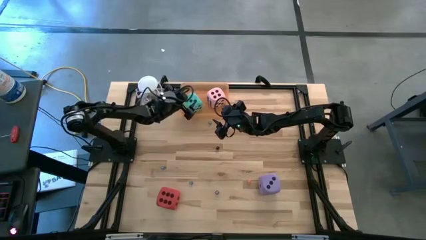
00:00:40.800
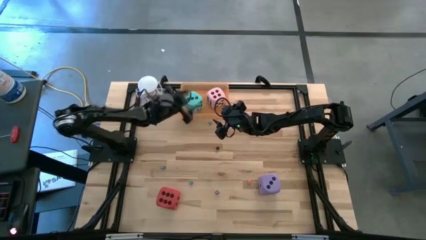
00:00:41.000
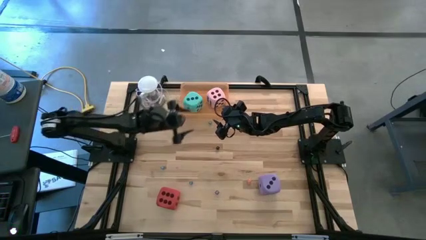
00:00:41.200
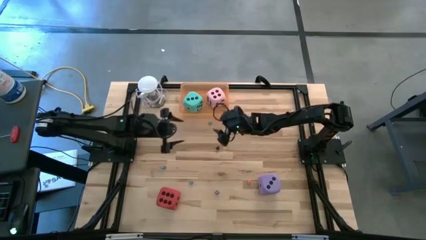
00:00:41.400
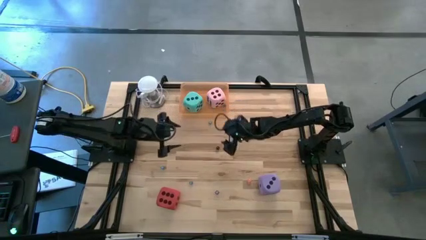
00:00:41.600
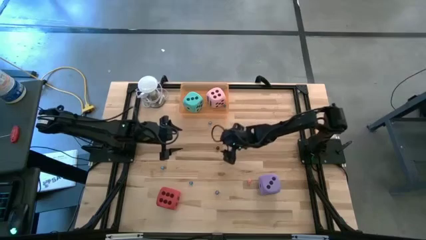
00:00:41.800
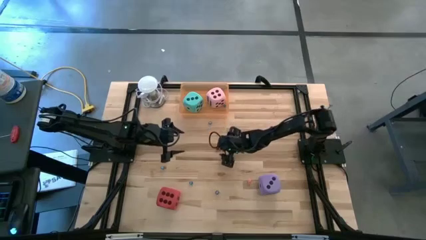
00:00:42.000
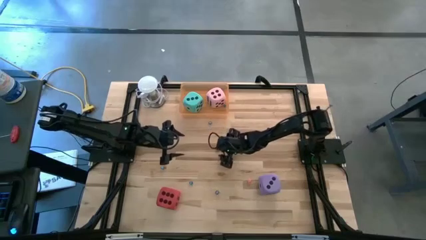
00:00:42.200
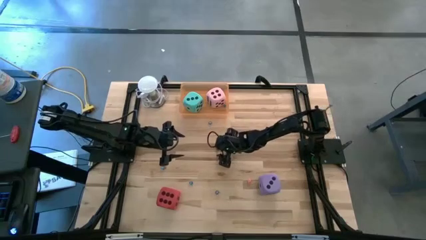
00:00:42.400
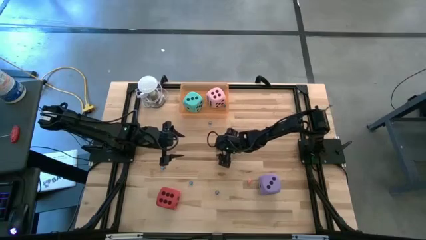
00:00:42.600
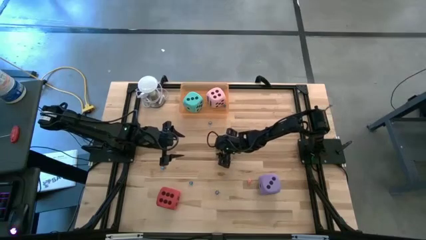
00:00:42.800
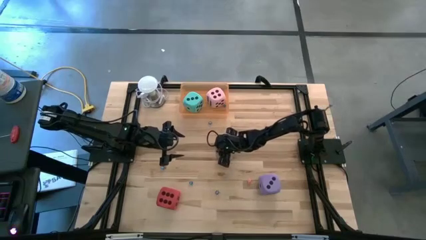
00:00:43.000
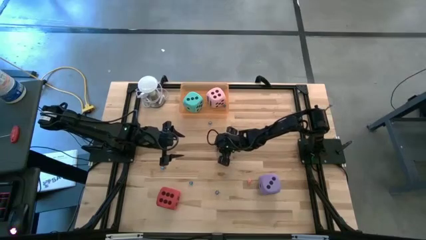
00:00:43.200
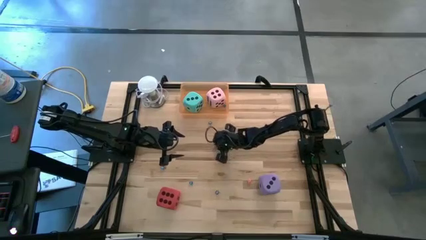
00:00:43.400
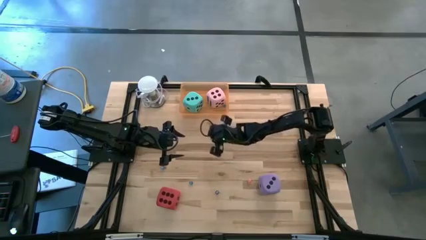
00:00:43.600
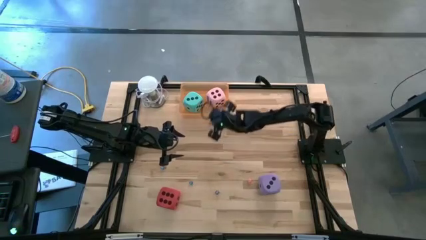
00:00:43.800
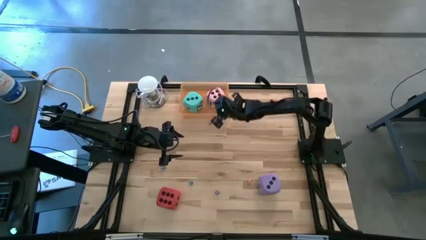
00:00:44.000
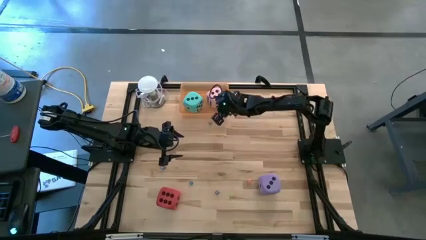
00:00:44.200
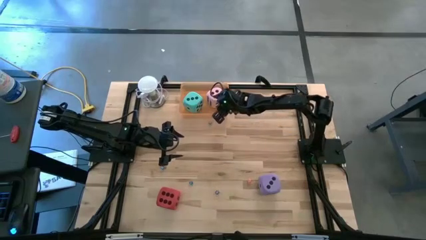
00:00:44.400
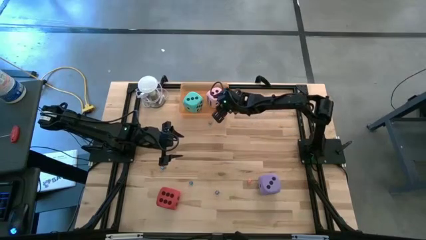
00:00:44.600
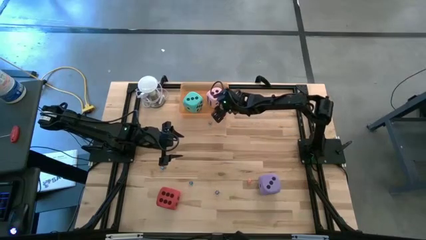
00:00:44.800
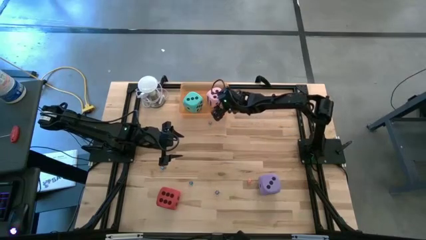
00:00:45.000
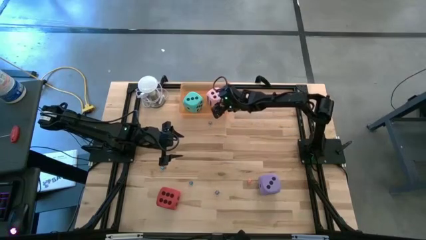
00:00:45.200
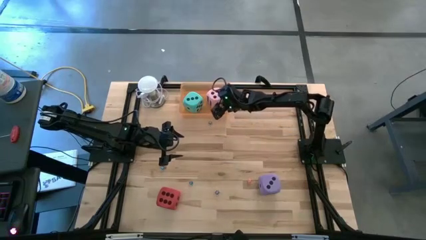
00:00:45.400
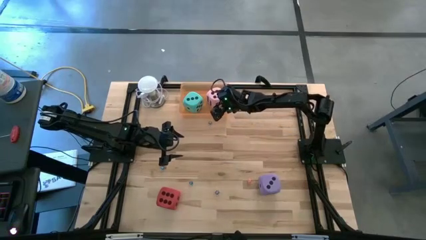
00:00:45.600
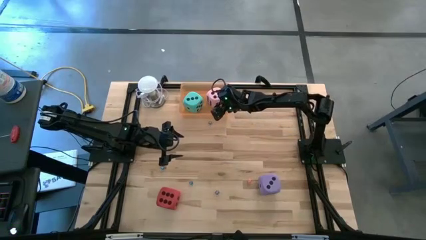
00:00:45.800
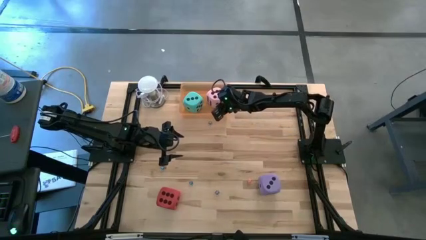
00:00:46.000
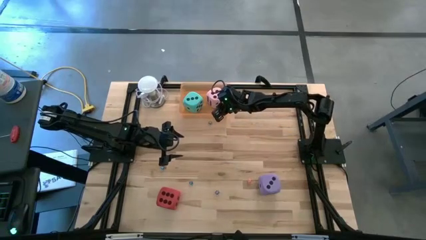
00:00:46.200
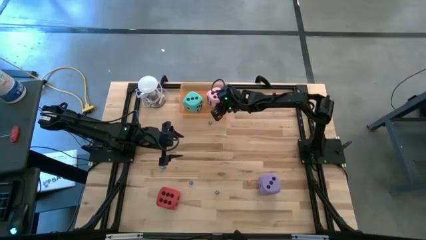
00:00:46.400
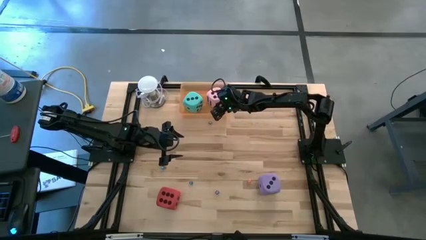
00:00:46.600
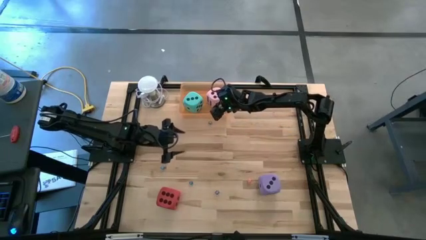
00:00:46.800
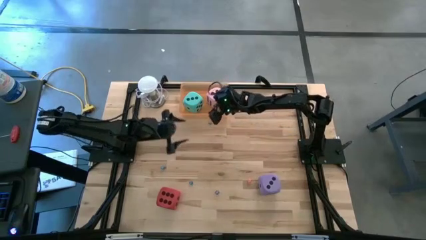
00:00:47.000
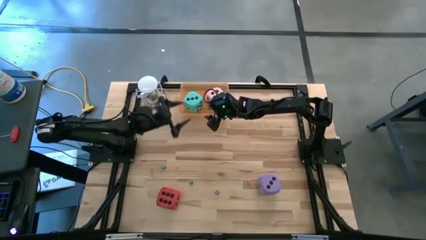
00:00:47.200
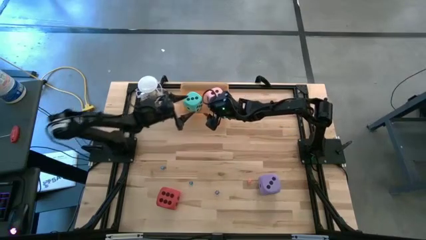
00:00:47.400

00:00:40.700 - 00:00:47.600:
Task: Pick & Place Dice
Put the small black die into the bin

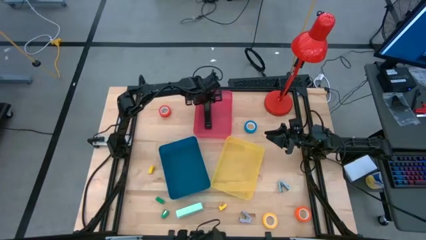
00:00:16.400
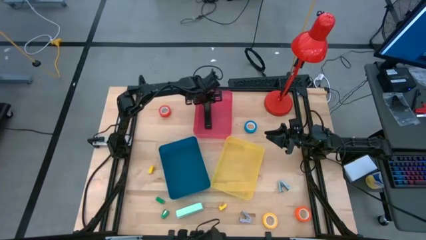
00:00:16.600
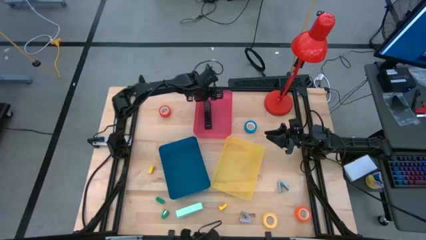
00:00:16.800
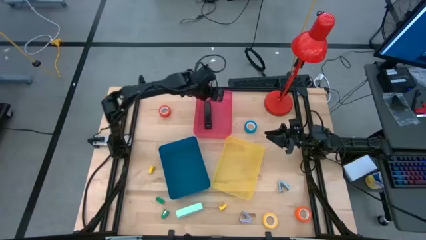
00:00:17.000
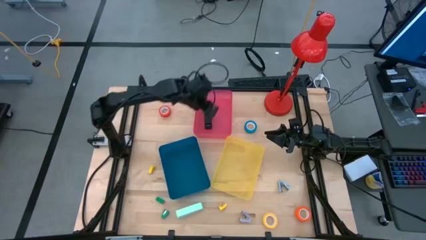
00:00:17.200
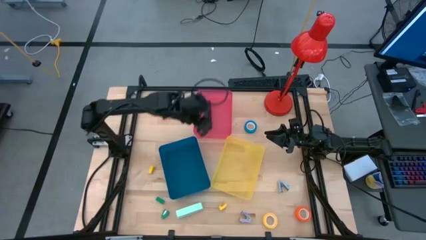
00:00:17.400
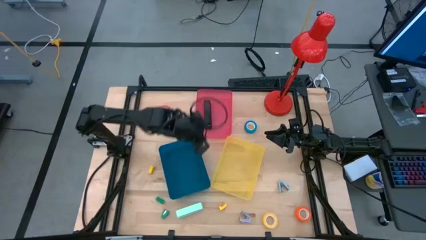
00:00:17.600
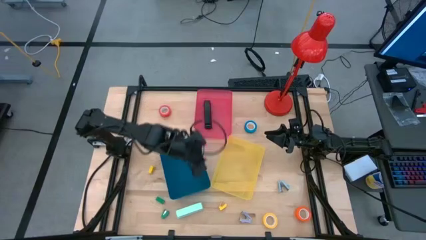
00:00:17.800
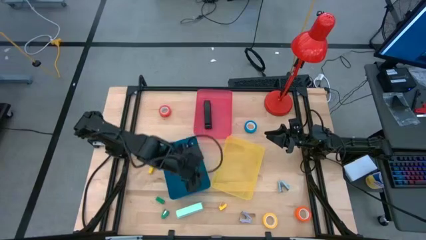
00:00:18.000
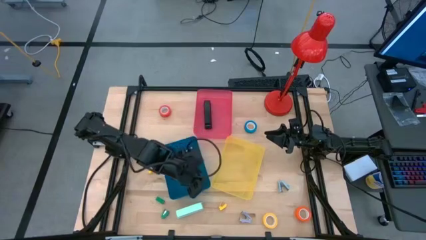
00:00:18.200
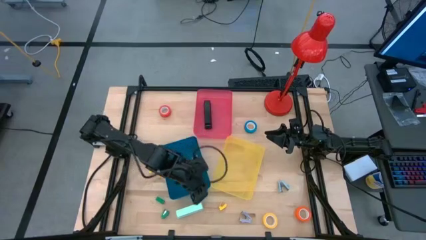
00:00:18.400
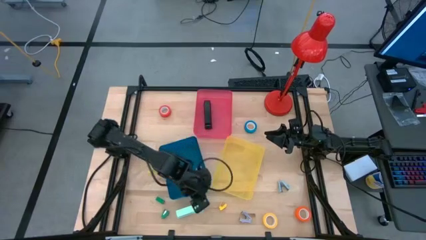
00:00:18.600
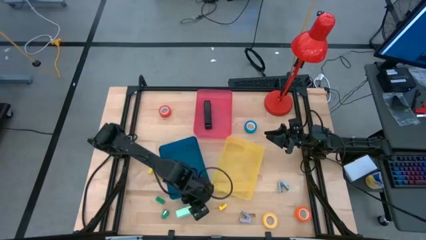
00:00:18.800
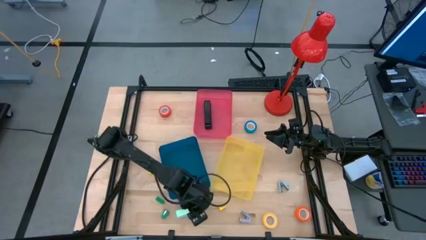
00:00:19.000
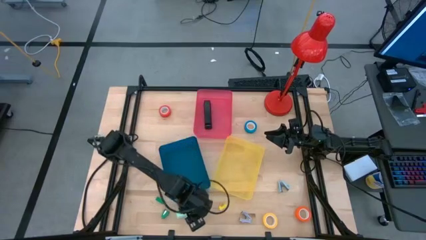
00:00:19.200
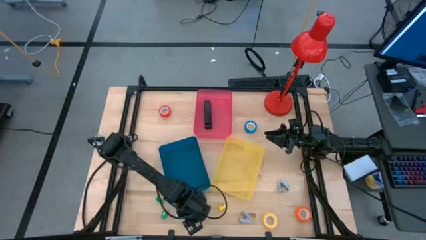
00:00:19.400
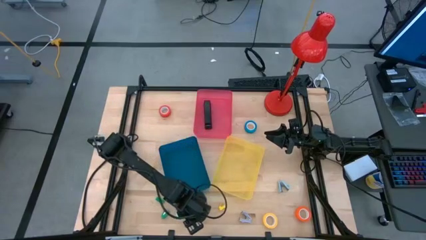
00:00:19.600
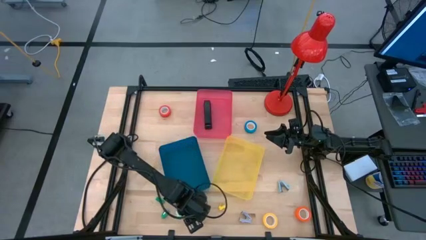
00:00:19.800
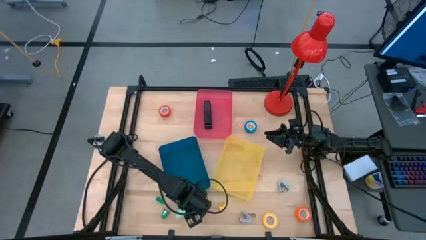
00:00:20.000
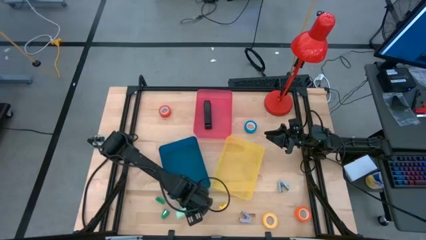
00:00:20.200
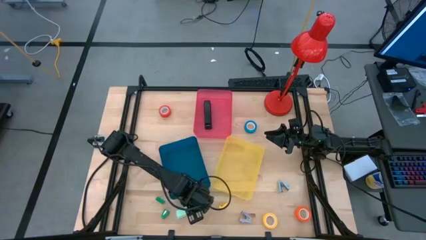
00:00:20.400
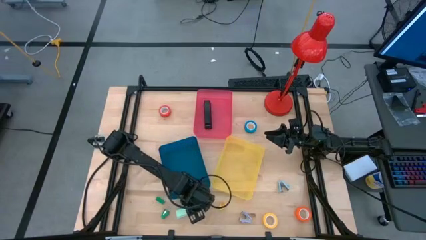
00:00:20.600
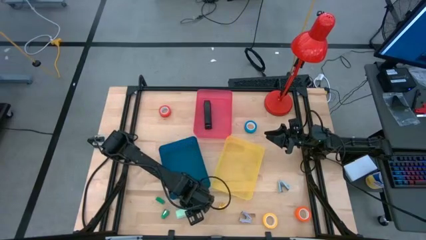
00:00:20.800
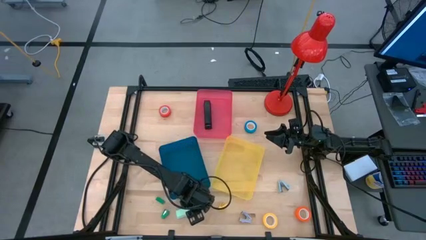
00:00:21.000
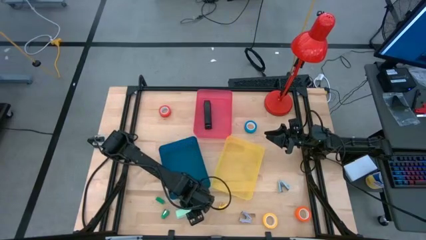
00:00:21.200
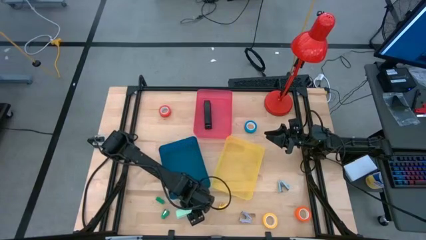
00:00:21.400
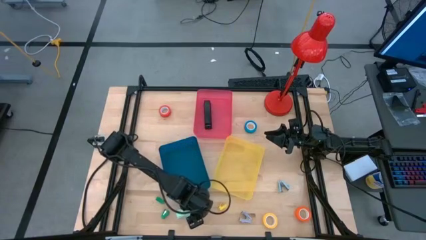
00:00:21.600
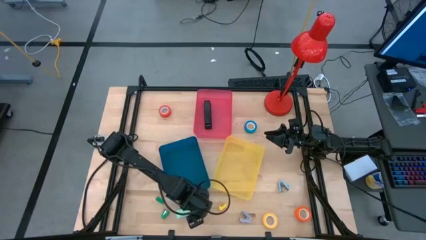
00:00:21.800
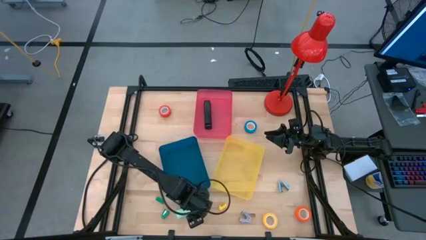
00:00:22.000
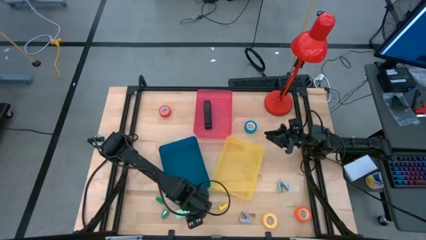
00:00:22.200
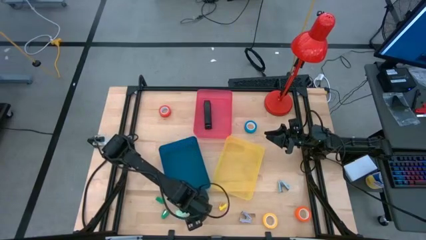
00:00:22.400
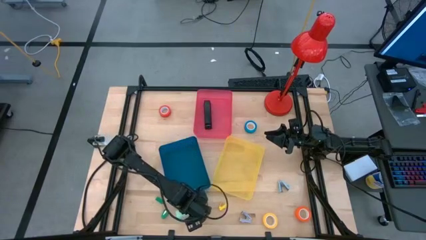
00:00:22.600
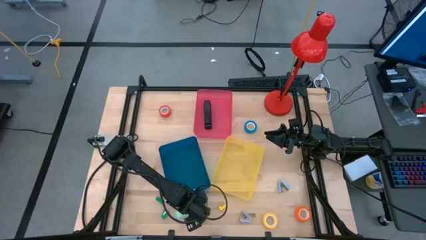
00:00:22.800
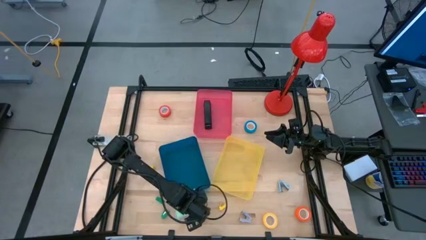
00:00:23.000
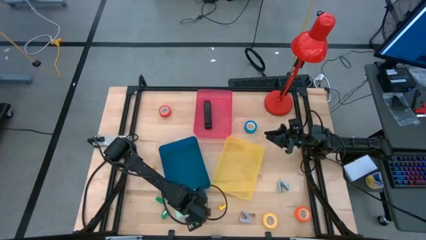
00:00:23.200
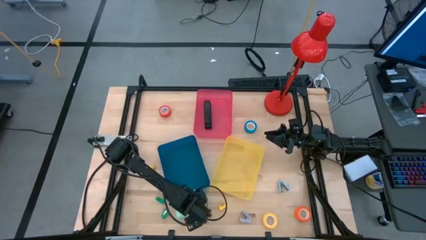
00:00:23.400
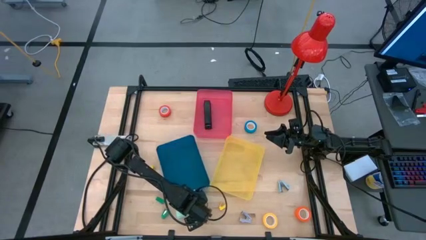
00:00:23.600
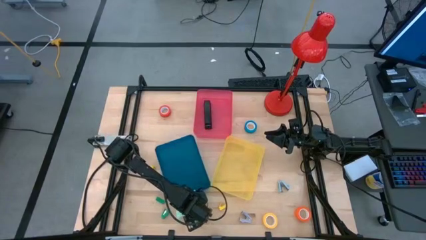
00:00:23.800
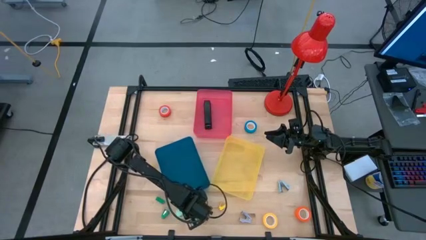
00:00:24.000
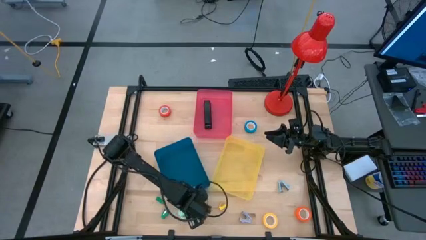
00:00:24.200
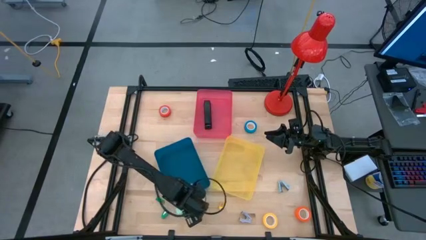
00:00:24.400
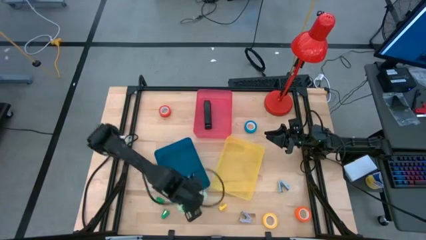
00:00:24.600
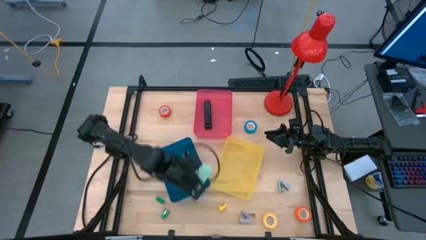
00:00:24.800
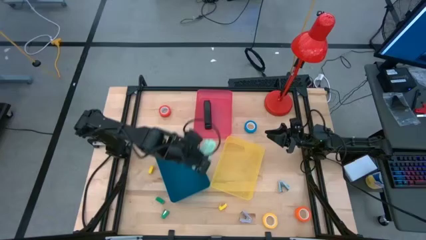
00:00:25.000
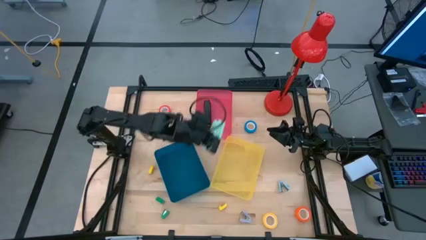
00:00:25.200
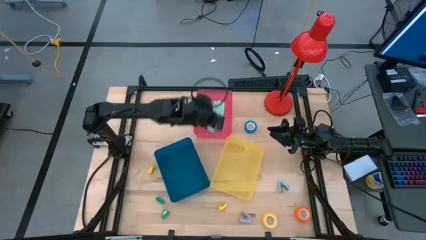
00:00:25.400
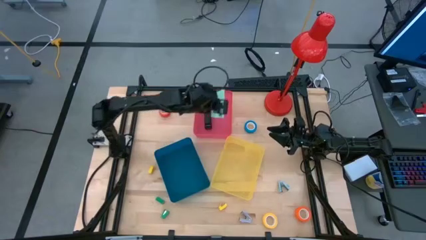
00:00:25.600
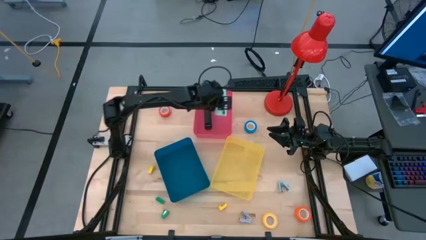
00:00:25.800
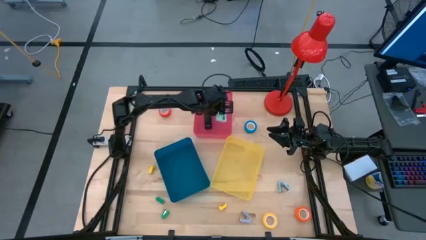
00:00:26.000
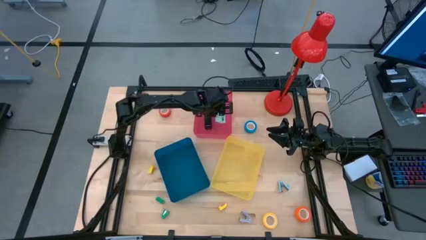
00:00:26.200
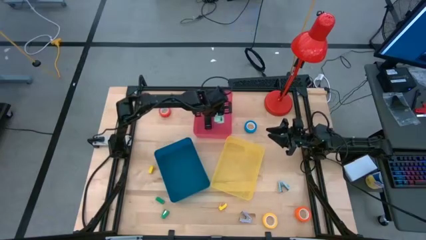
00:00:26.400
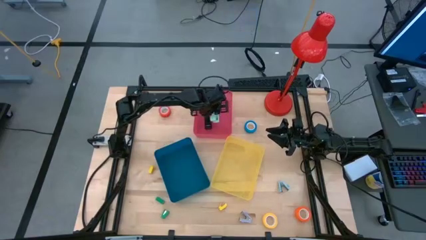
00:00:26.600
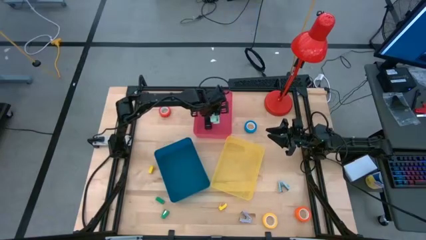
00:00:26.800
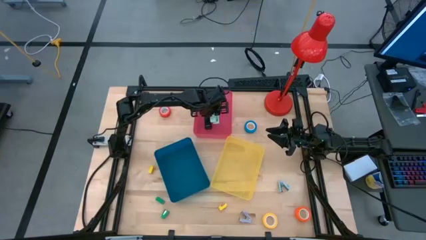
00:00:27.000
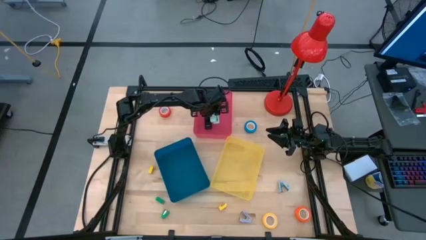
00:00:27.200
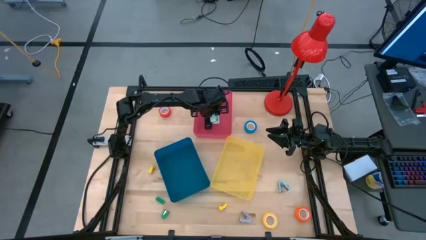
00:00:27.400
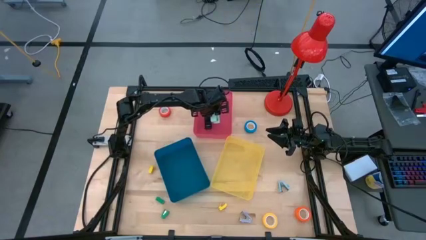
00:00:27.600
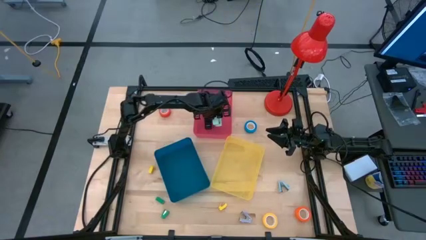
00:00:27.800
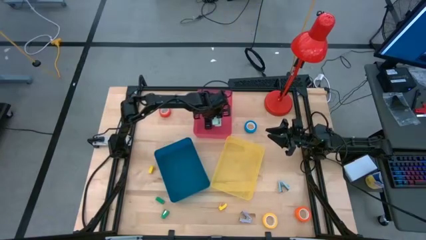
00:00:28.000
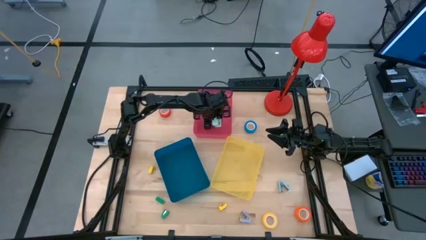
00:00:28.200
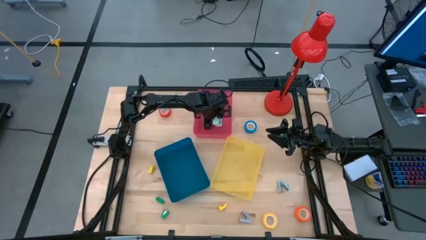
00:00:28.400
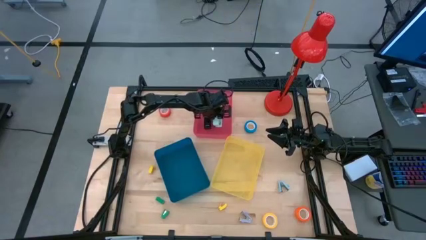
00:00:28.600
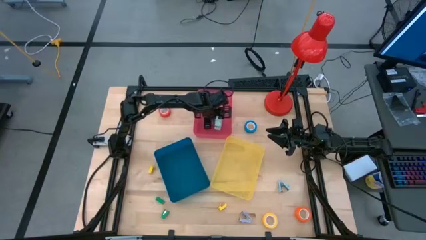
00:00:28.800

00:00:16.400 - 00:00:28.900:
Task: Pick and place Stapler, Stapler remover, tape
Put the big light green stapler into the red bin
